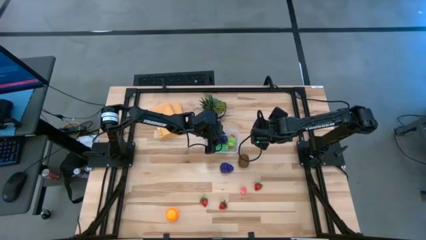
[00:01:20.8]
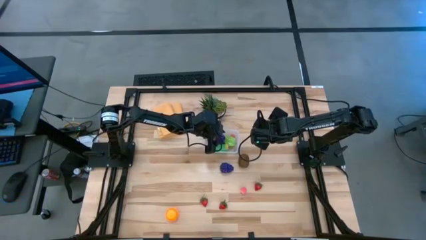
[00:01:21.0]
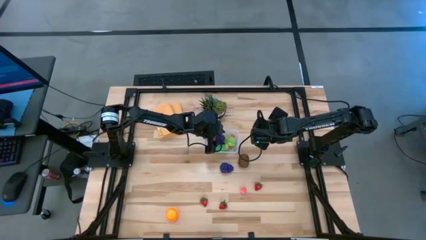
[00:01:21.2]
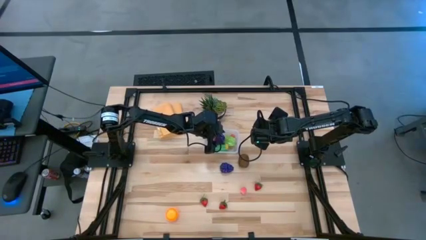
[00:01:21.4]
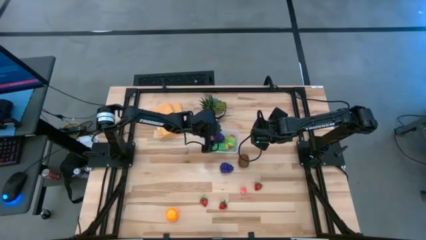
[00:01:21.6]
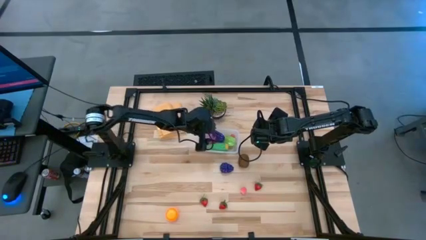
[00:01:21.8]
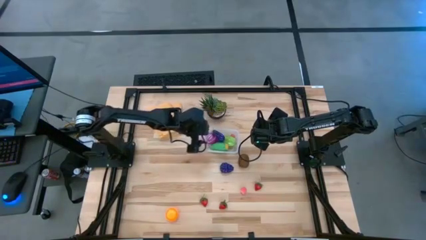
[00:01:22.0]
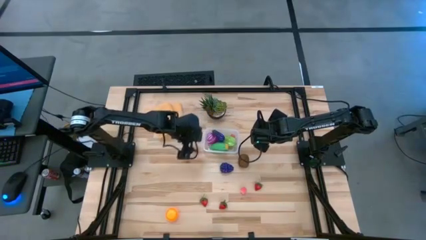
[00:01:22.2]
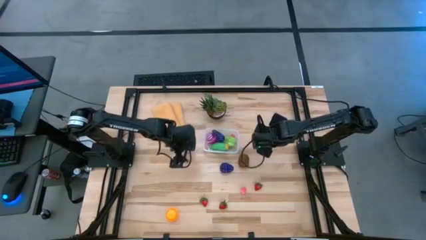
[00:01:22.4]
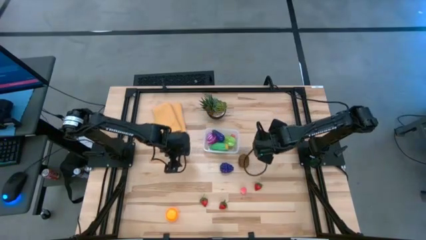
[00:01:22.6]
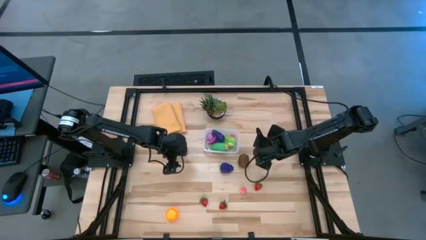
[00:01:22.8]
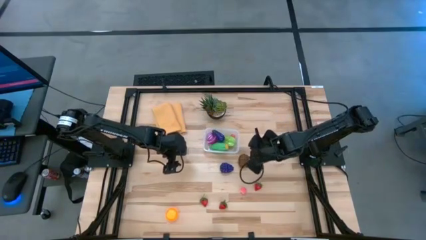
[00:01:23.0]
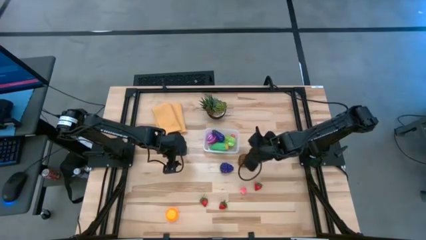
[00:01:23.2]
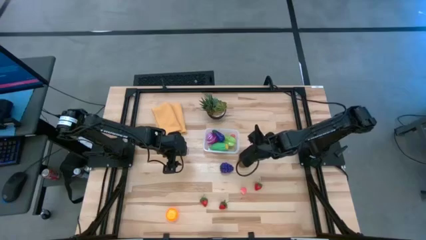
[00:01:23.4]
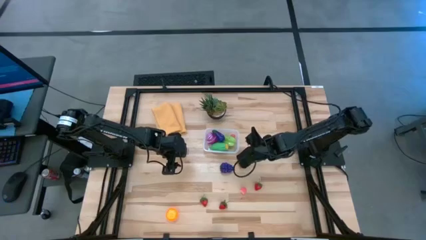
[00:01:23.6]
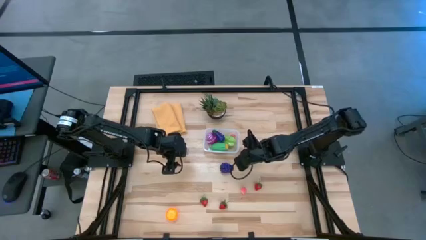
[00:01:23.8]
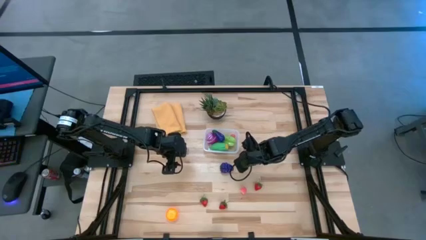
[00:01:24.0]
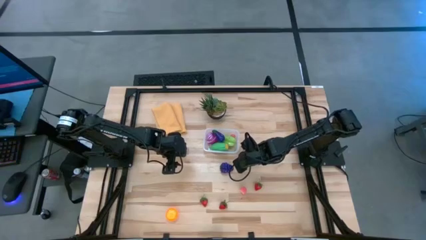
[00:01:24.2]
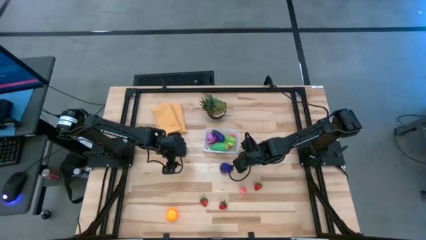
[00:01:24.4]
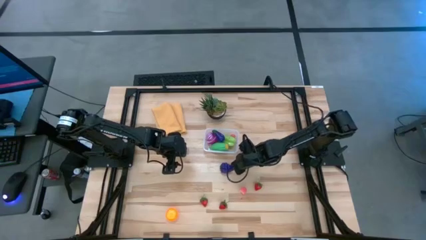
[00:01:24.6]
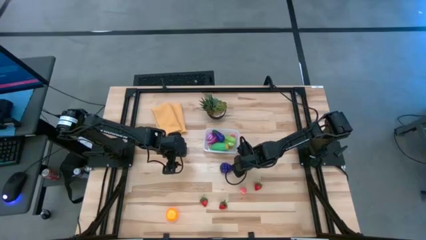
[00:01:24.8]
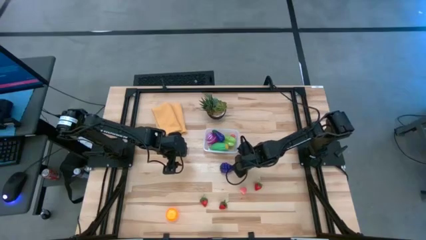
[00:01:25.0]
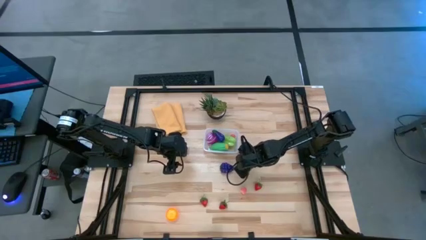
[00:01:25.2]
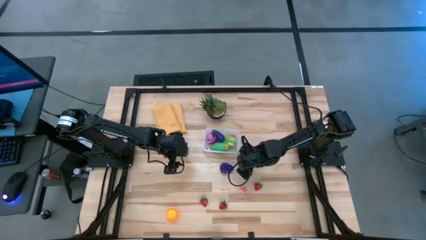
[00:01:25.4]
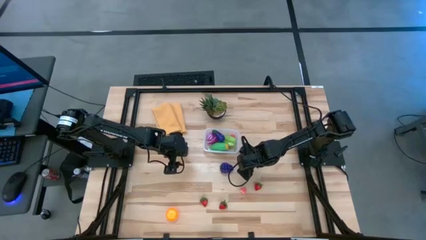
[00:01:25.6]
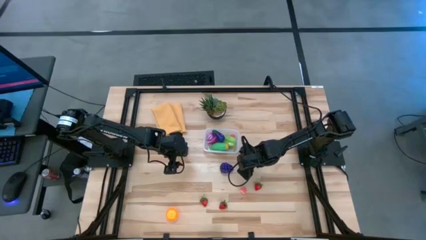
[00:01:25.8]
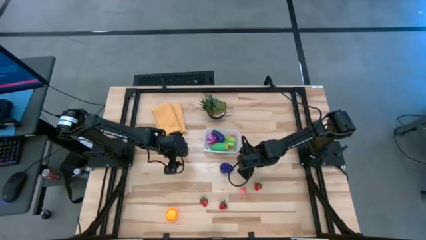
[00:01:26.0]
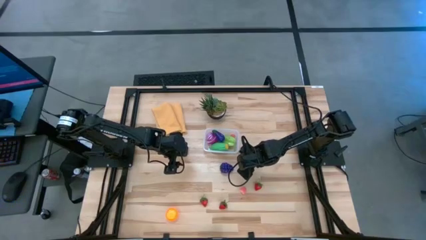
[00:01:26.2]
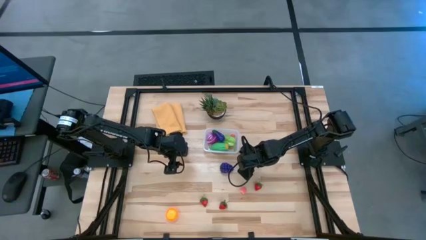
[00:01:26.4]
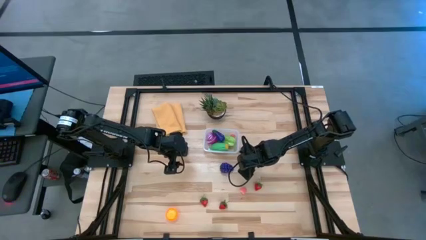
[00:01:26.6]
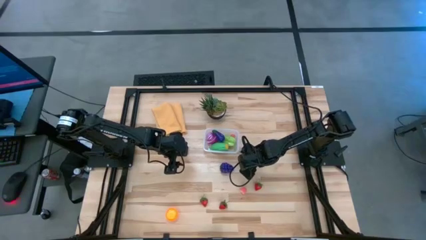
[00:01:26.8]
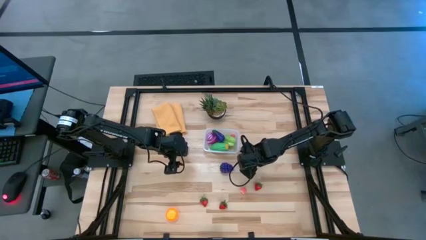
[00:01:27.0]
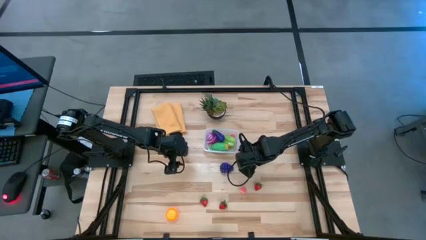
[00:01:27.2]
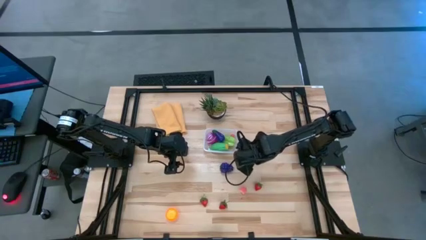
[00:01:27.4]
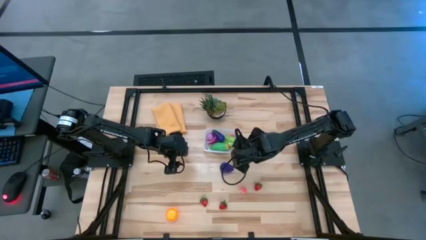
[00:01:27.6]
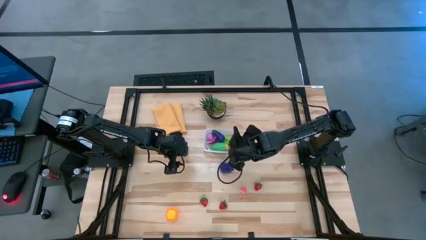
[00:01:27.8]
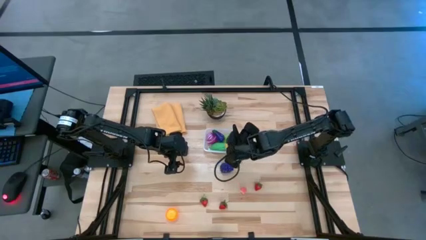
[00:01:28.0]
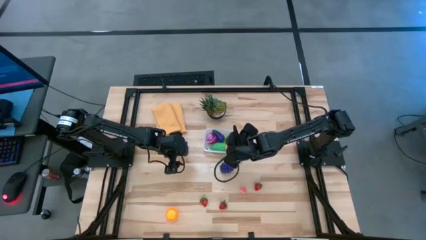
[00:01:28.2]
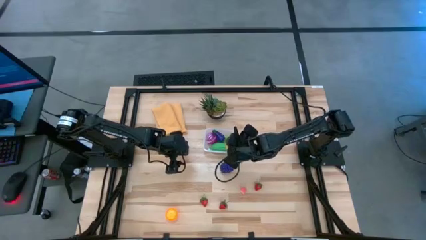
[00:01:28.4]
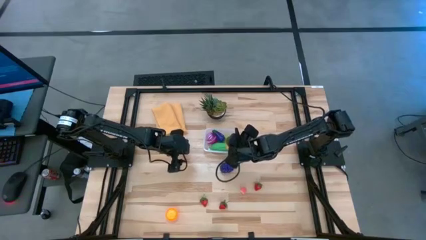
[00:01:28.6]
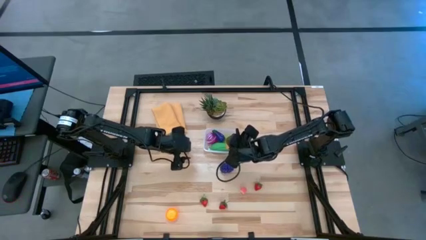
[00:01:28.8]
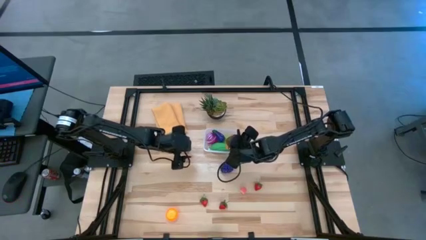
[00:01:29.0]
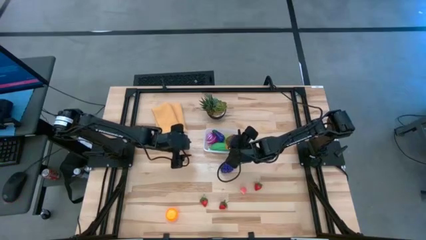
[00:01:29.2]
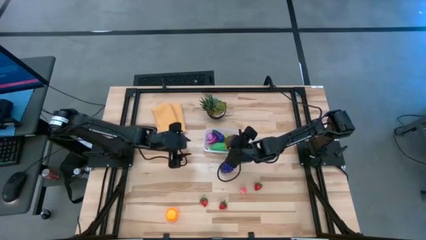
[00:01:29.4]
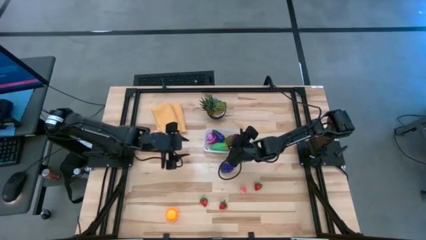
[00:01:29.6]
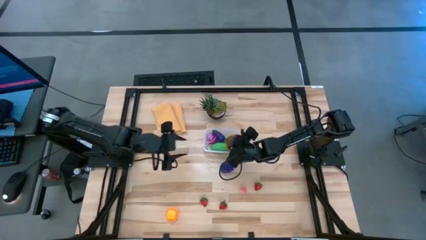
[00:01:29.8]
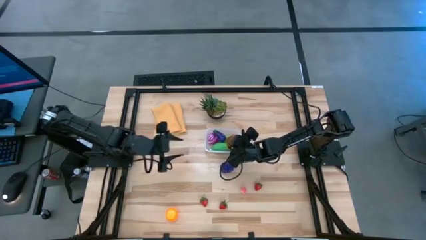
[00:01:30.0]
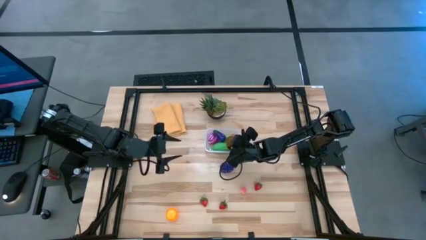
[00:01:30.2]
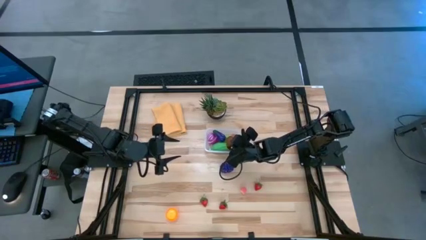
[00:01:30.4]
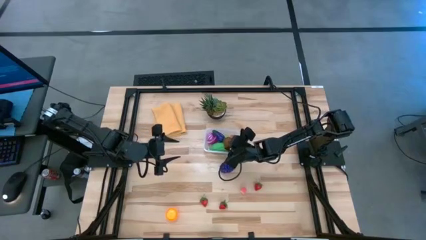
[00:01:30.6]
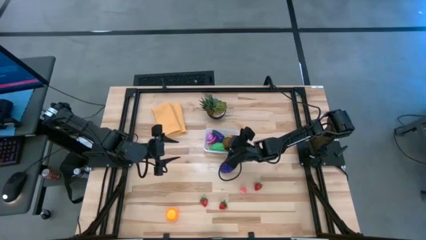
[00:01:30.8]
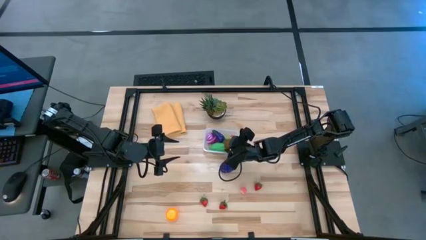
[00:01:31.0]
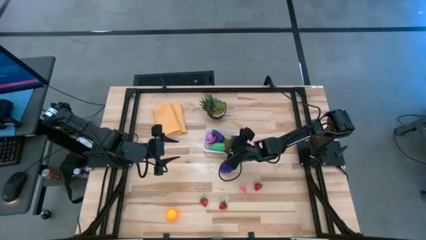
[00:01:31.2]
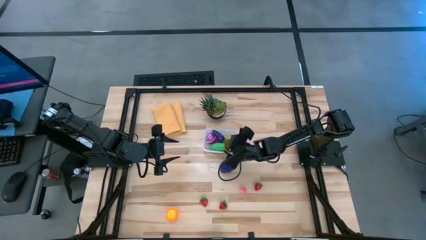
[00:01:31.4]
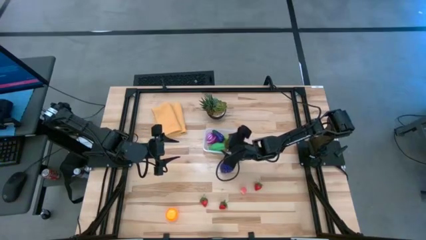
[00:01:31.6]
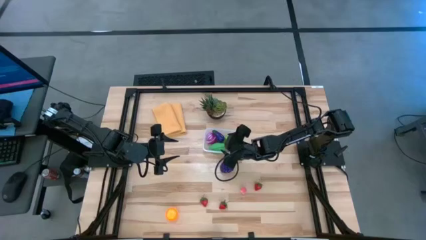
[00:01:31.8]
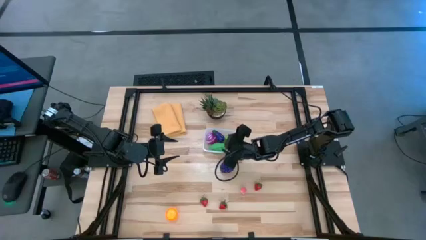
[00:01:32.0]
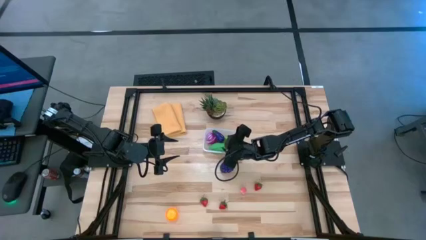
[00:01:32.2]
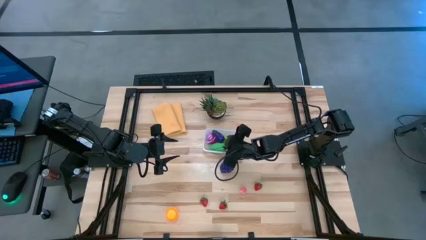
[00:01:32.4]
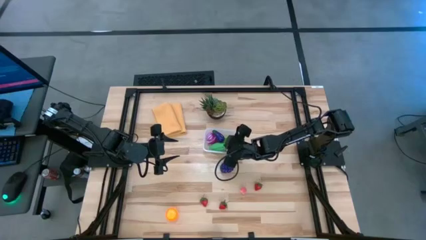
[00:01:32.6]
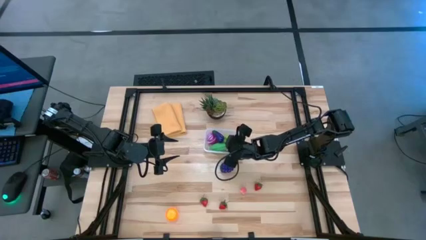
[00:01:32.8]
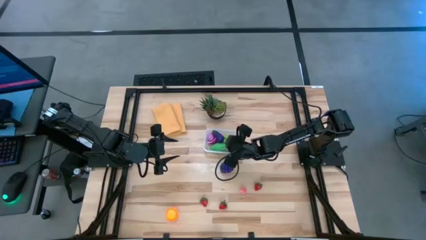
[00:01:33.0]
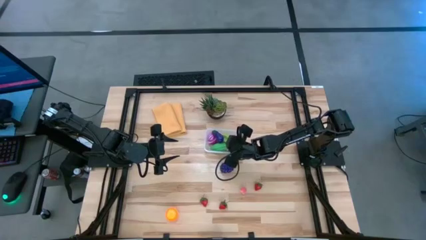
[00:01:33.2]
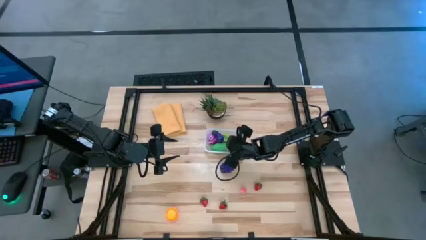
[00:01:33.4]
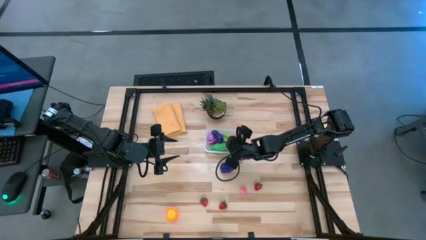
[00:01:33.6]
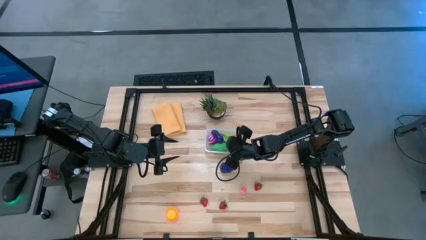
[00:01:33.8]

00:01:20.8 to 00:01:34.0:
Task: Pick and placing Produce into tupperware
Put the brown kiwi into the transparent container
